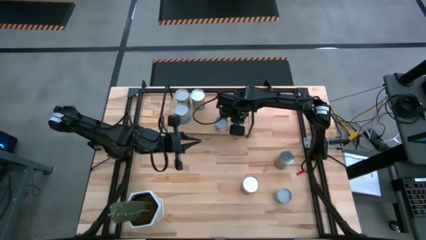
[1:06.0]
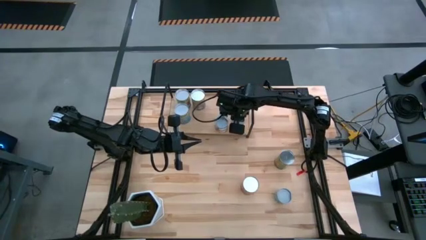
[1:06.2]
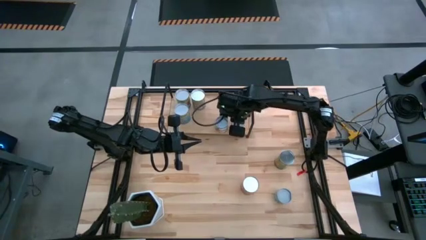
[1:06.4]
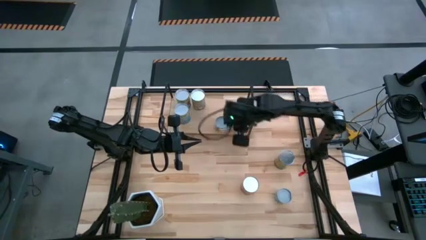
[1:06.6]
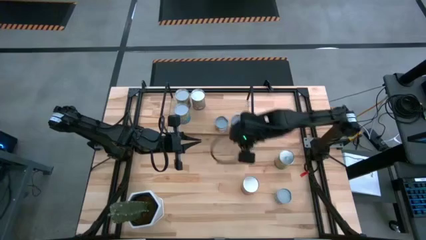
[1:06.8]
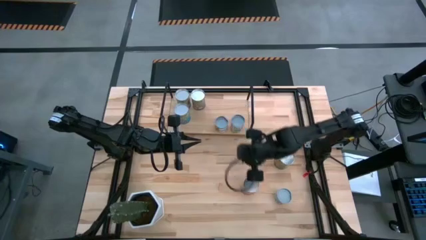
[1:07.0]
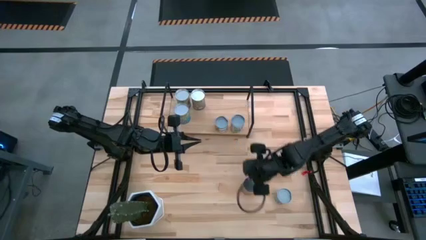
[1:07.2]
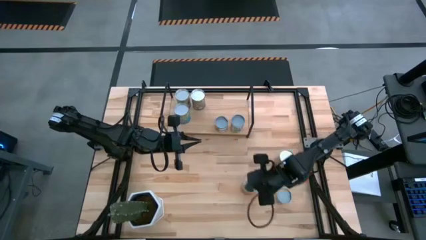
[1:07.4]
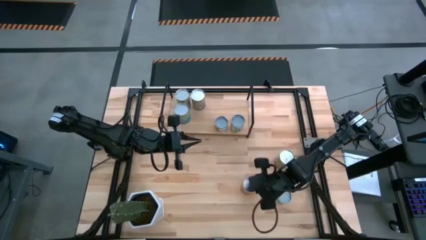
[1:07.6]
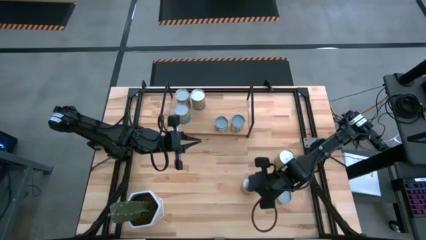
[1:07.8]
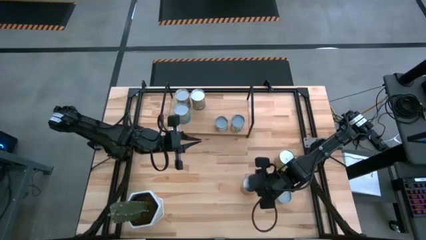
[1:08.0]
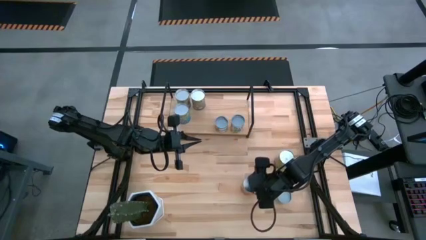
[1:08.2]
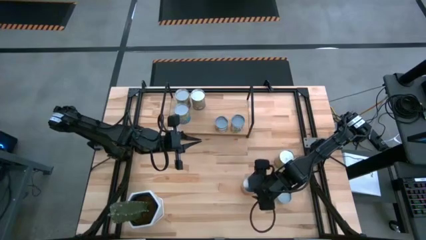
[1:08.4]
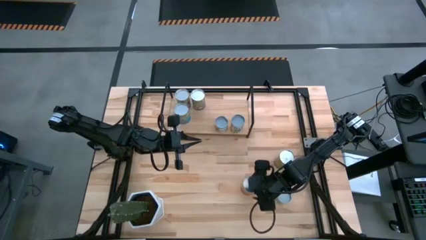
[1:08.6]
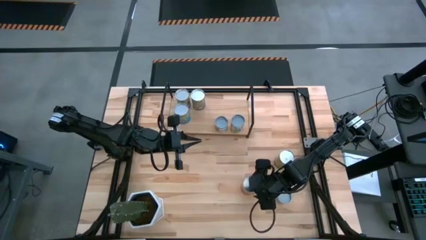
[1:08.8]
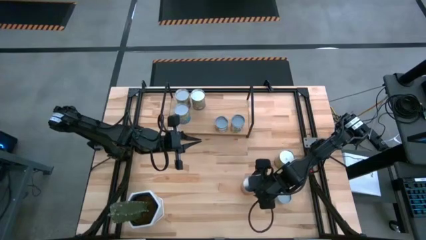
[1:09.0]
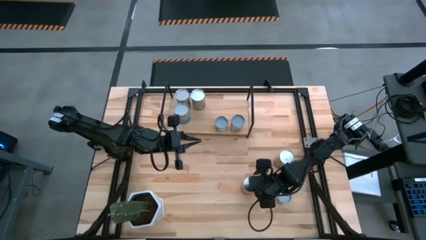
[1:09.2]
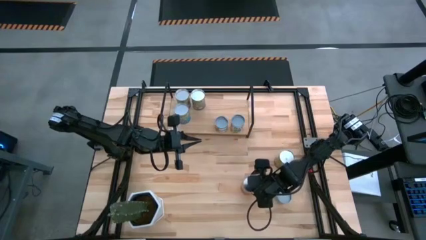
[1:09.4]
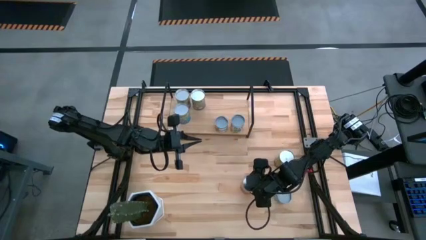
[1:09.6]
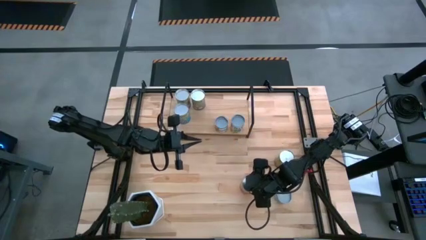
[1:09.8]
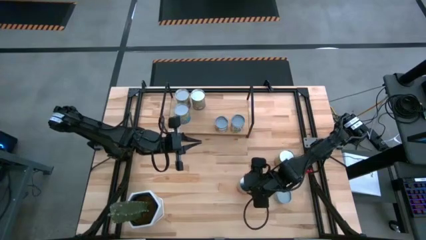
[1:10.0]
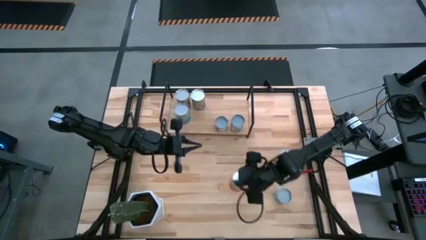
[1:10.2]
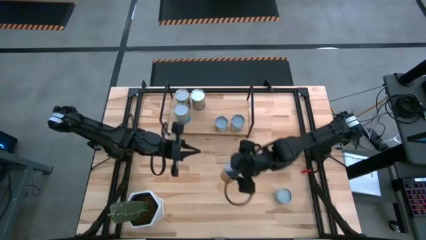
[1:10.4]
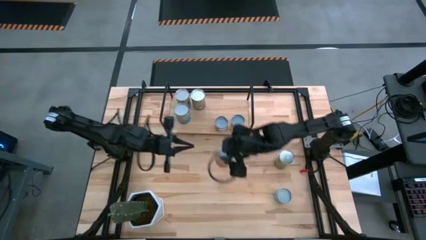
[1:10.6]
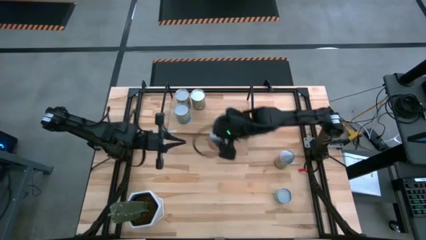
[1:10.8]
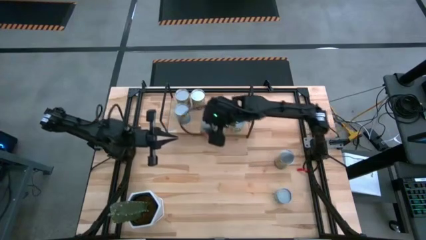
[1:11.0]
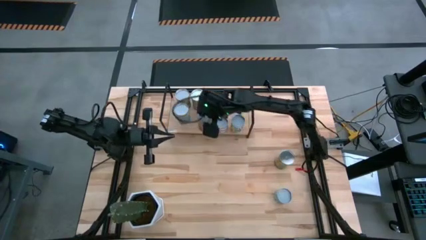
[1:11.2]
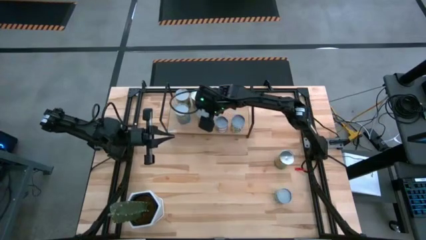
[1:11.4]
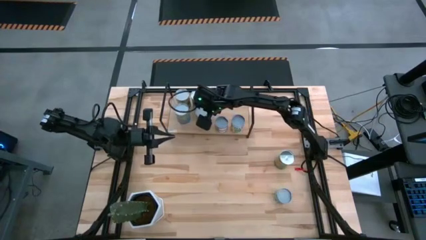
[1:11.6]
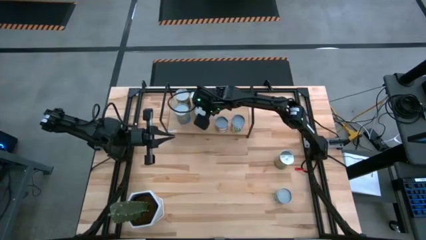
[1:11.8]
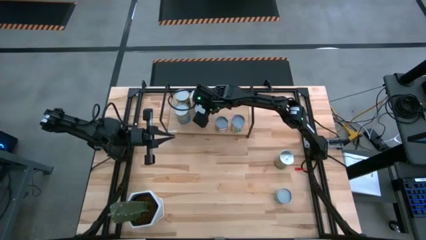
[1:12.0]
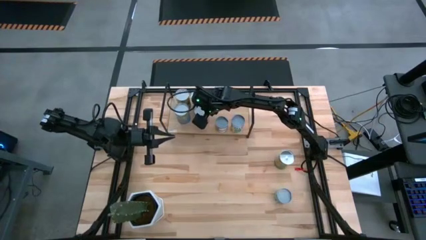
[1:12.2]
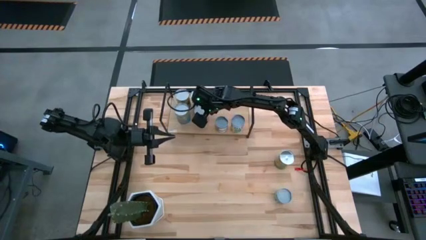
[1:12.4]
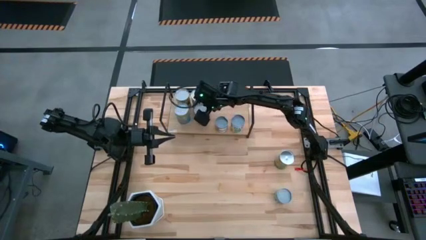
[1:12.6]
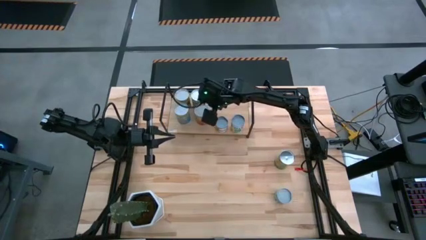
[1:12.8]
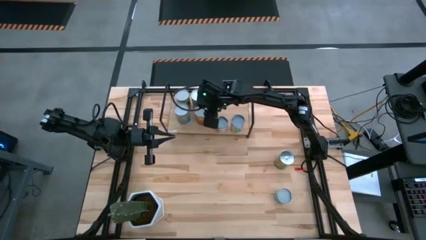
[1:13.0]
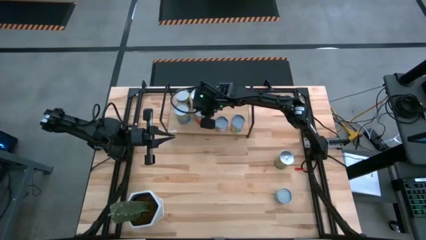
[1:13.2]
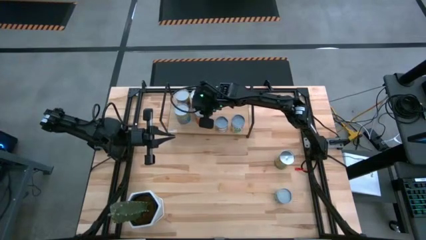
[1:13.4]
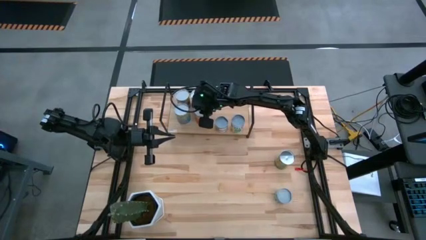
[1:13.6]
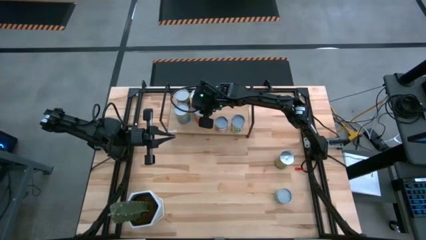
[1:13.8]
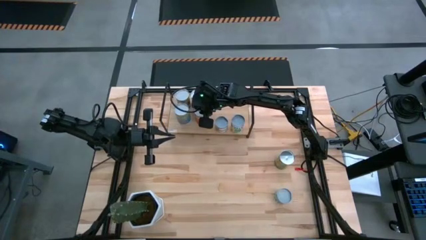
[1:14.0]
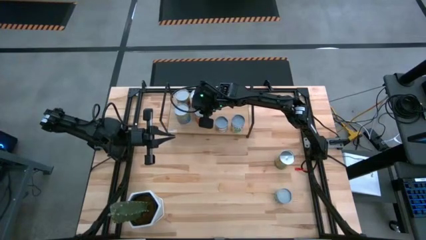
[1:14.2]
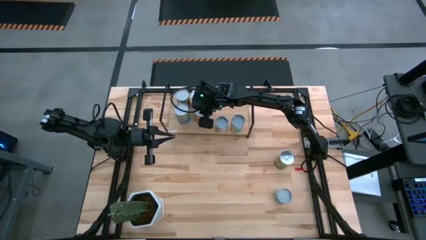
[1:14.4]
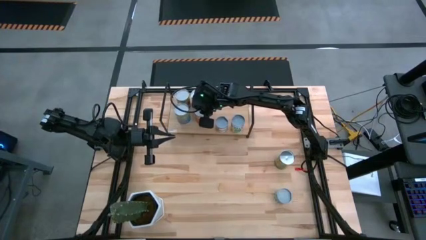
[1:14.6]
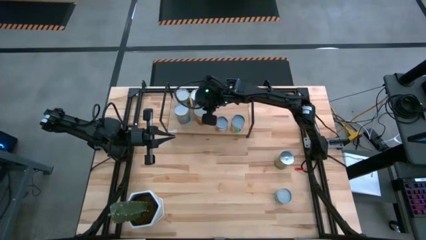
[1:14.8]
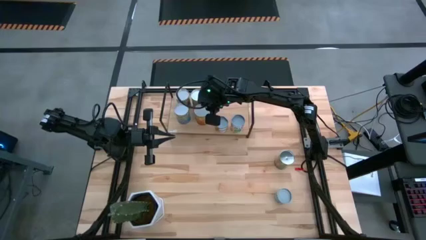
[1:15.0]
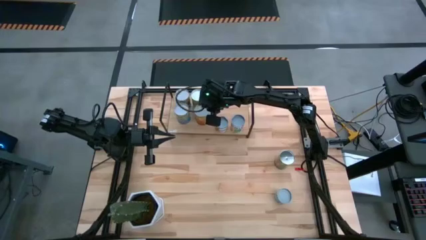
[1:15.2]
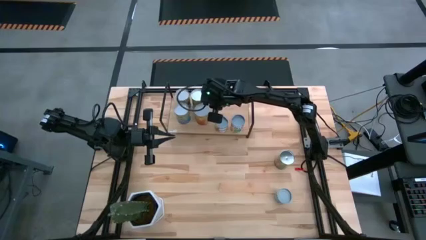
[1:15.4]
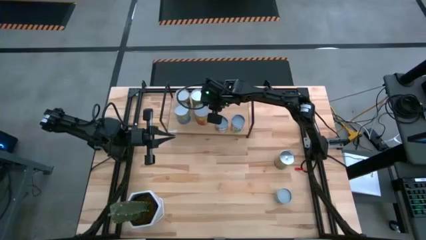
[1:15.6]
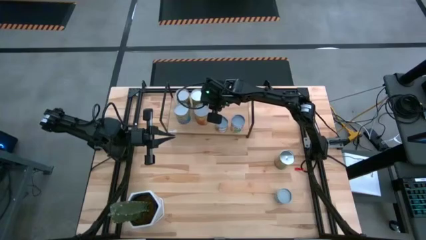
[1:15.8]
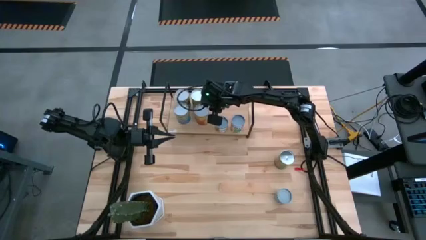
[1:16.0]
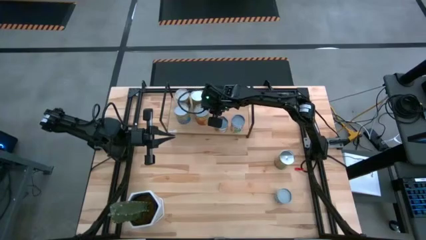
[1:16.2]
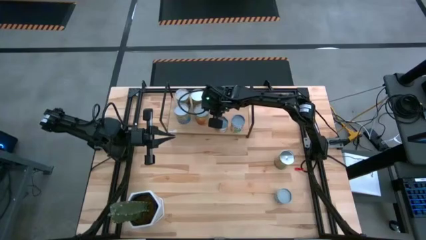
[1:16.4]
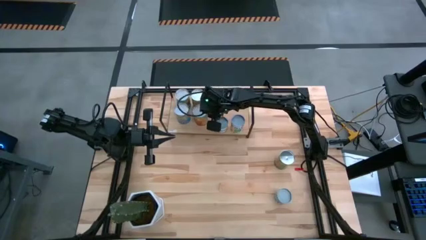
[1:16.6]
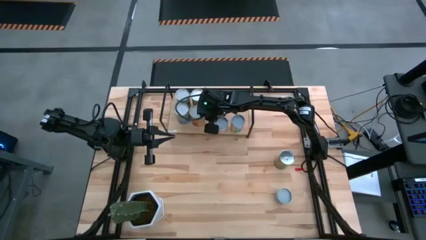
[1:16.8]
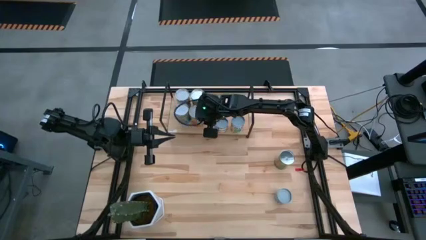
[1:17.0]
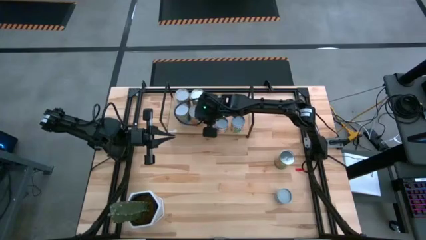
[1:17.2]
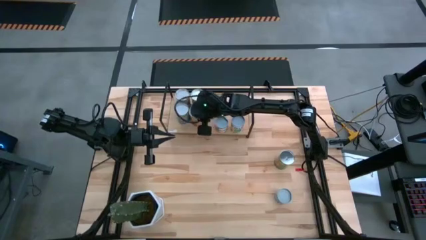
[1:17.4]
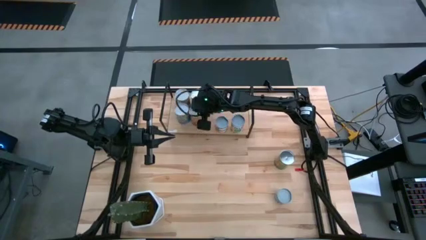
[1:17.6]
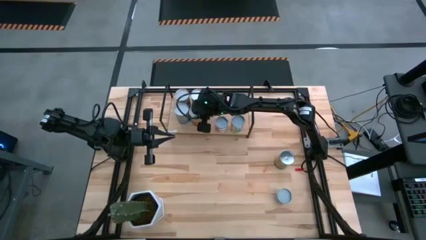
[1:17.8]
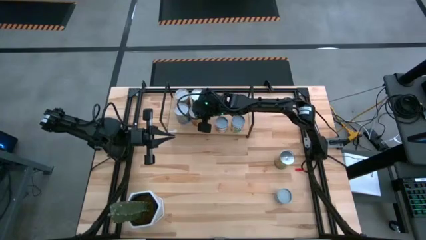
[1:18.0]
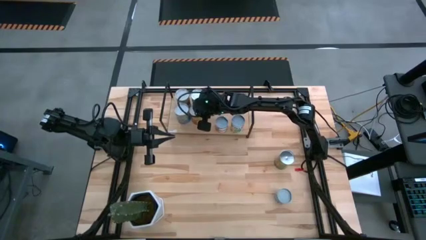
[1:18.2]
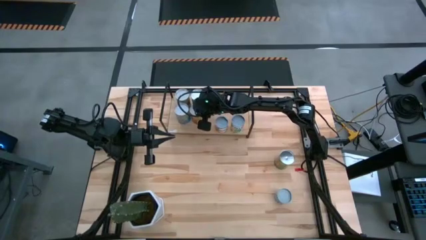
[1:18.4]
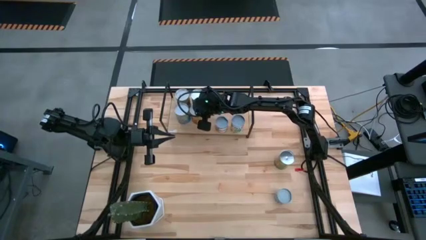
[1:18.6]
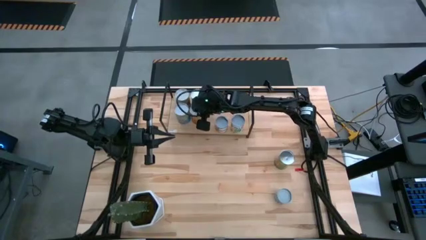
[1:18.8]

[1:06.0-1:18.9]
Task: Pick and place cans onto a shelf
Put the canned pineapple on the shelf

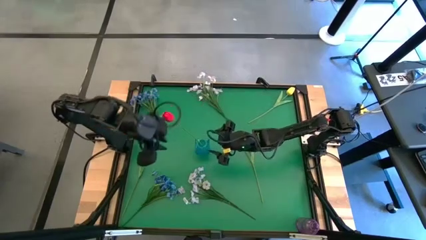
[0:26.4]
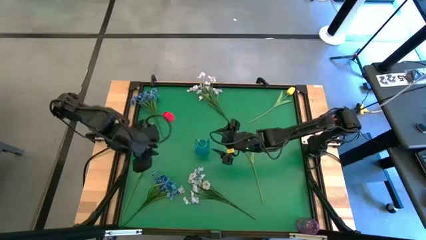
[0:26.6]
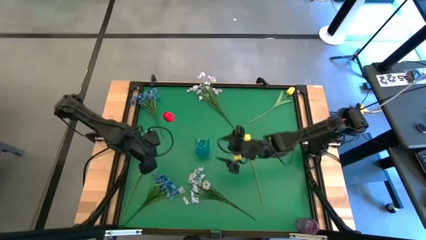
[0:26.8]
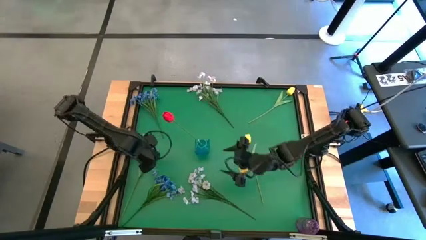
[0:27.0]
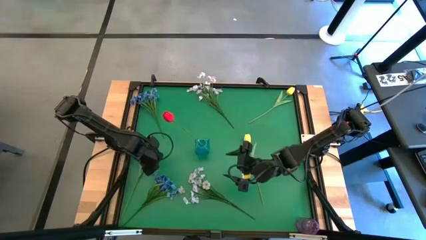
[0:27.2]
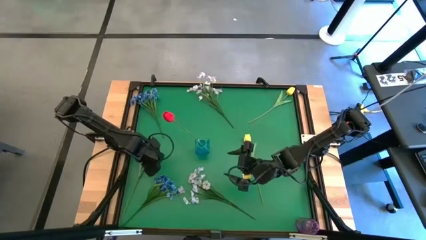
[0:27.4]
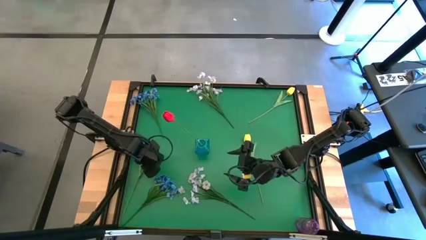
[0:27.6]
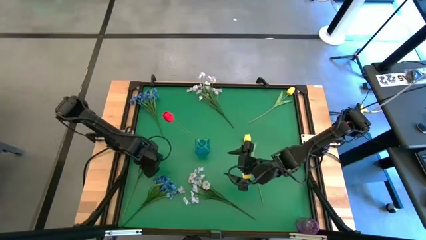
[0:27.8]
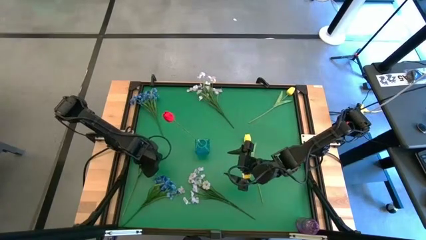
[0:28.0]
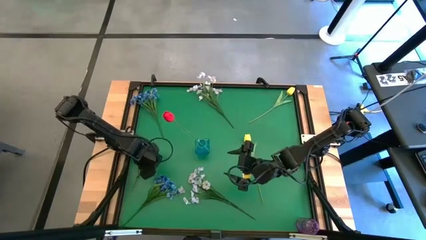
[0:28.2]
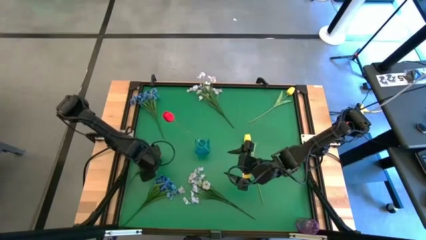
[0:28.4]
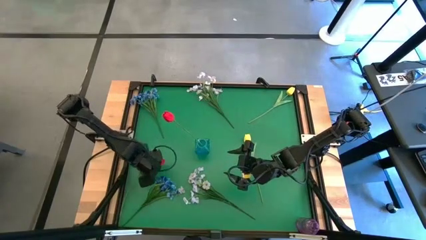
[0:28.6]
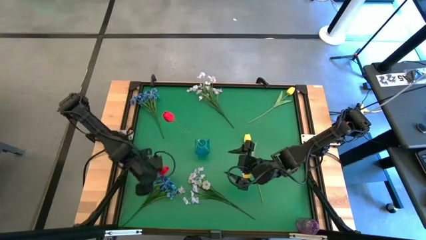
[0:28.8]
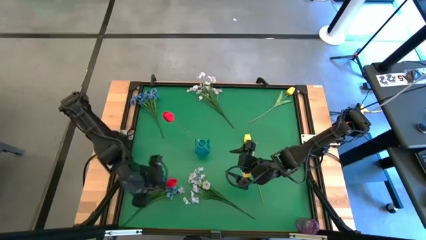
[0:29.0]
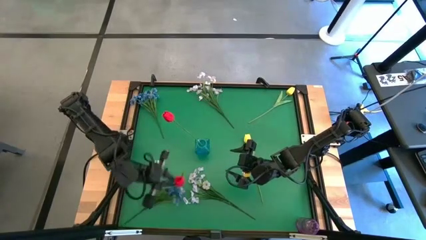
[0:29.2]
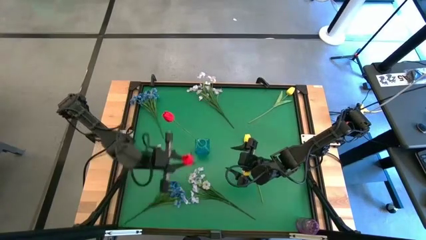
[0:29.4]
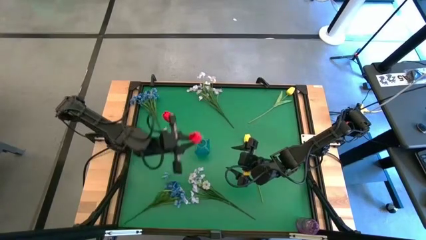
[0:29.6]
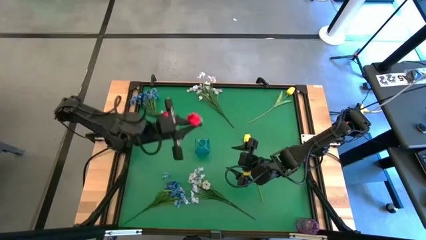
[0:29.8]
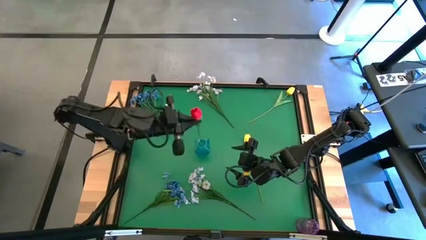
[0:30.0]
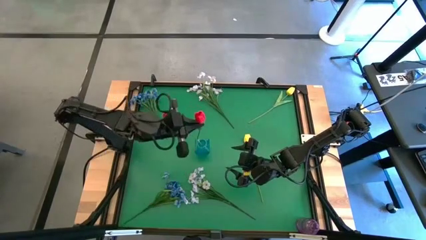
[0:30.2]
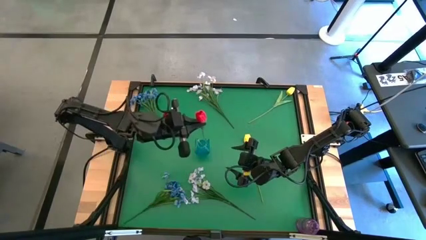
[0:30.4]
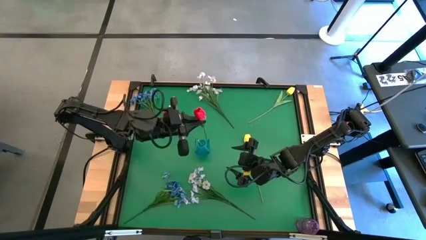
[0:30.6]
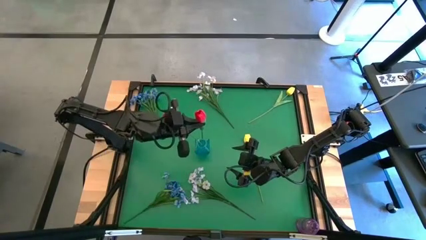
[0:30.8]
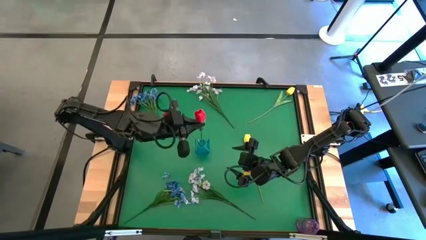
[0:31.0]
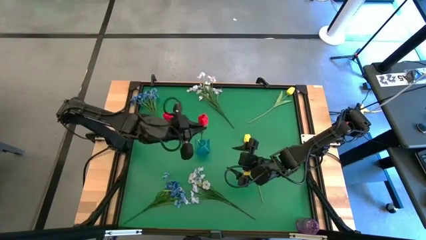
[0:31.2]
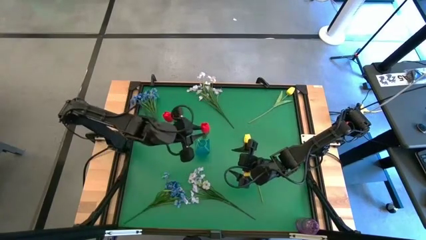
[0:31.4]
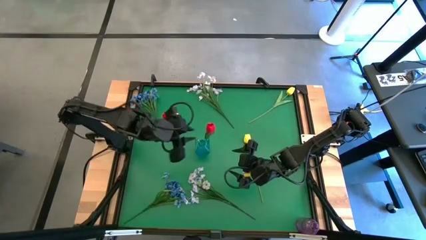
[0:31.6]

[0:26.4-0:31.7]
Task: Sort flowers into vase by color
Put the red flower into the blue vase
